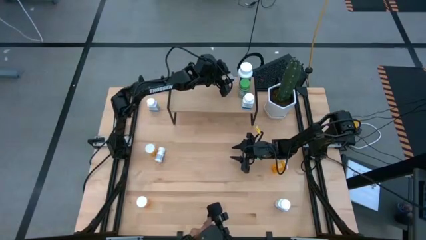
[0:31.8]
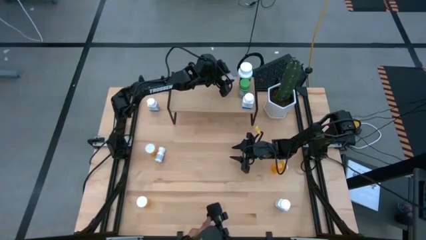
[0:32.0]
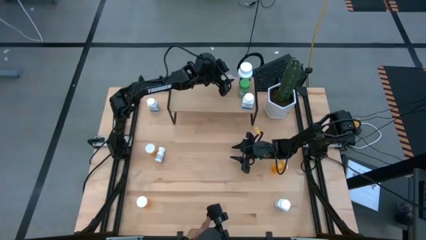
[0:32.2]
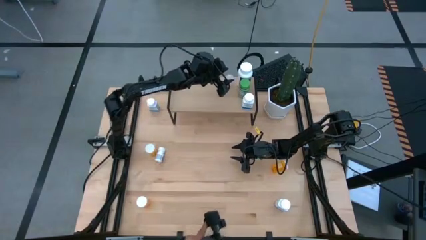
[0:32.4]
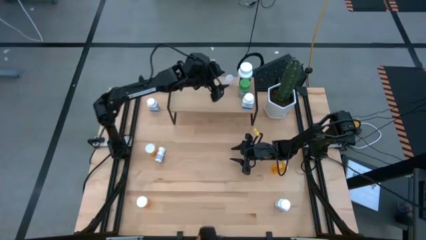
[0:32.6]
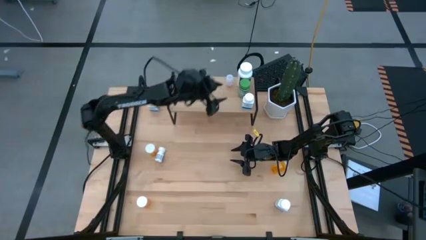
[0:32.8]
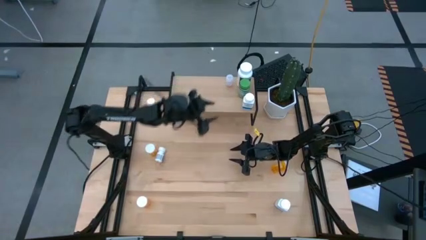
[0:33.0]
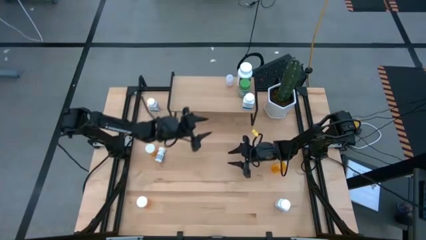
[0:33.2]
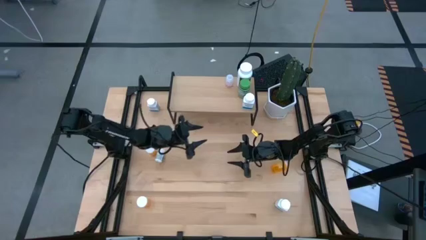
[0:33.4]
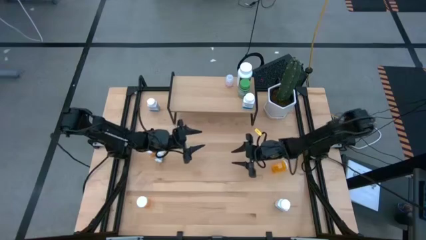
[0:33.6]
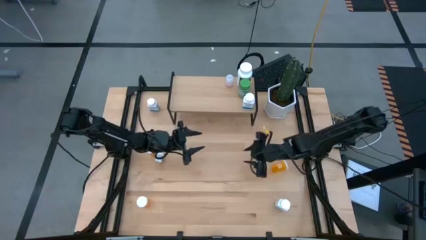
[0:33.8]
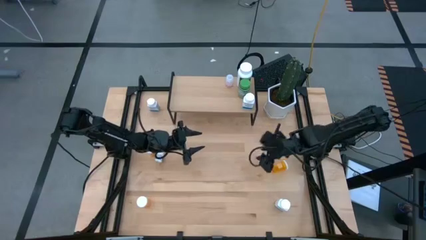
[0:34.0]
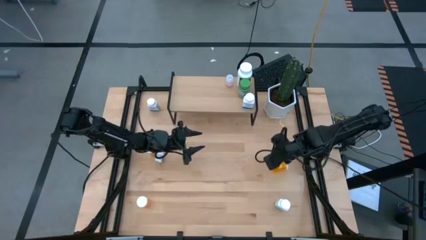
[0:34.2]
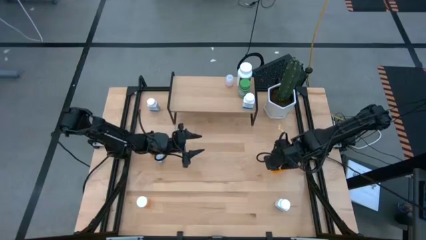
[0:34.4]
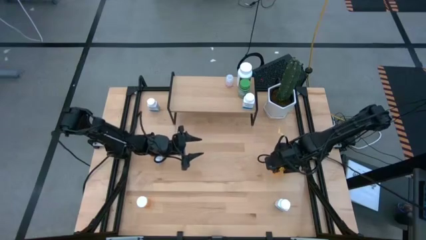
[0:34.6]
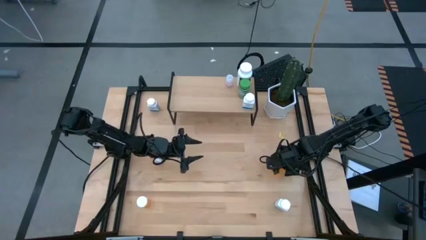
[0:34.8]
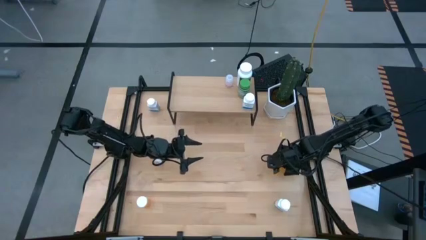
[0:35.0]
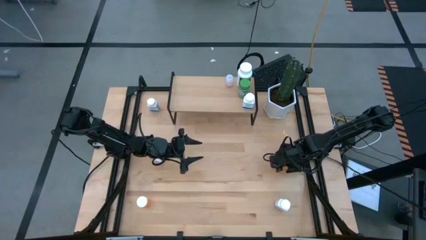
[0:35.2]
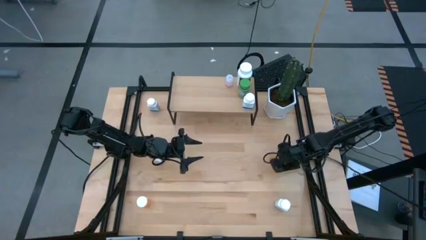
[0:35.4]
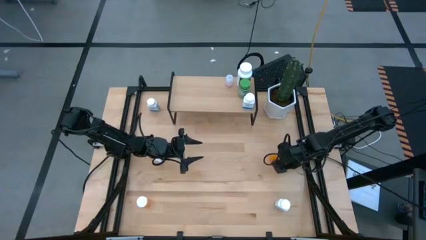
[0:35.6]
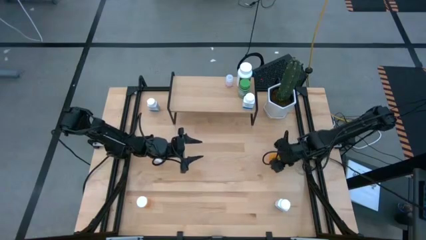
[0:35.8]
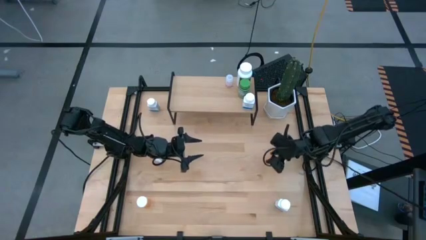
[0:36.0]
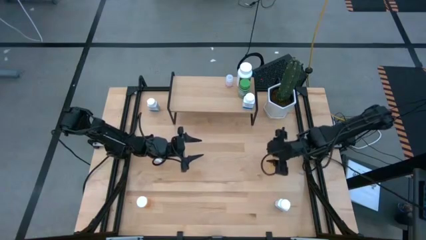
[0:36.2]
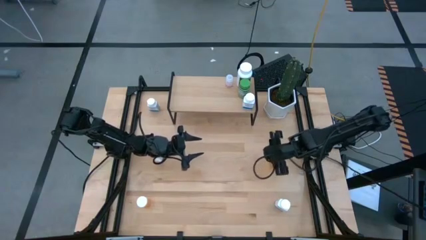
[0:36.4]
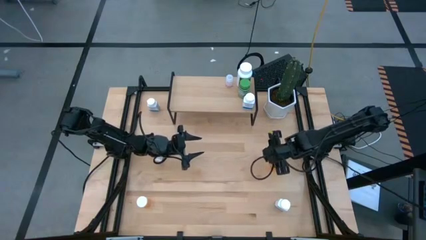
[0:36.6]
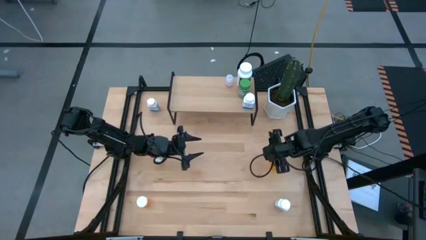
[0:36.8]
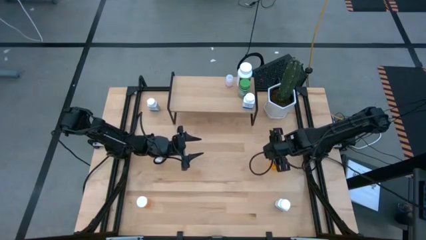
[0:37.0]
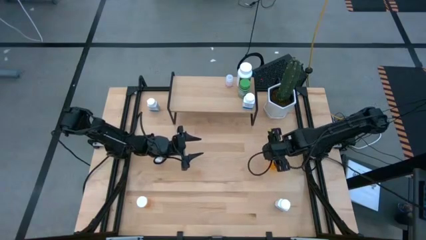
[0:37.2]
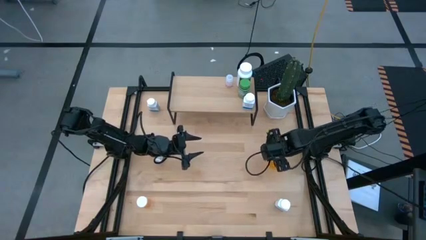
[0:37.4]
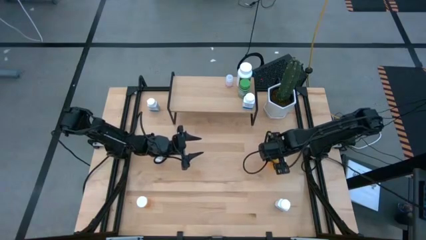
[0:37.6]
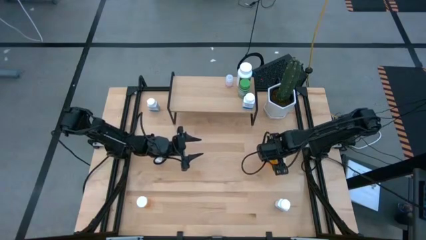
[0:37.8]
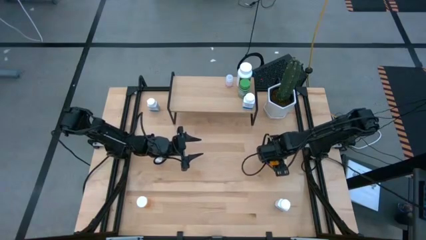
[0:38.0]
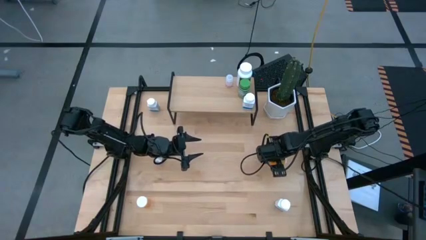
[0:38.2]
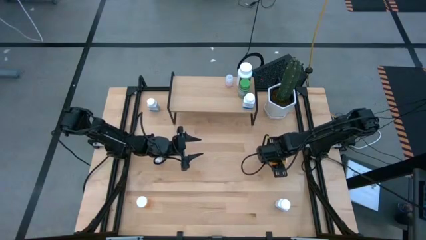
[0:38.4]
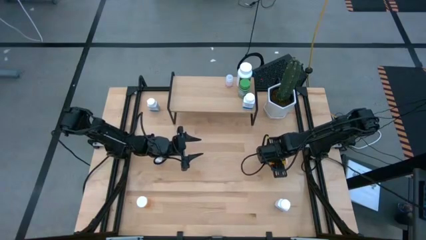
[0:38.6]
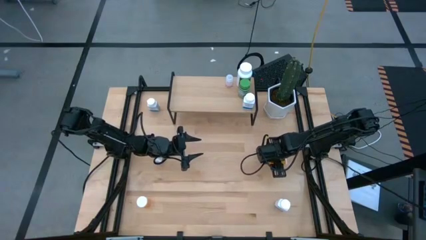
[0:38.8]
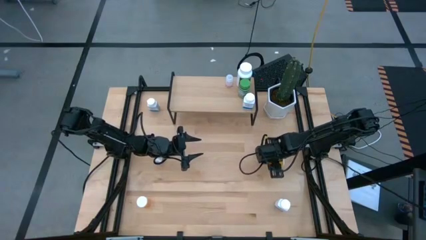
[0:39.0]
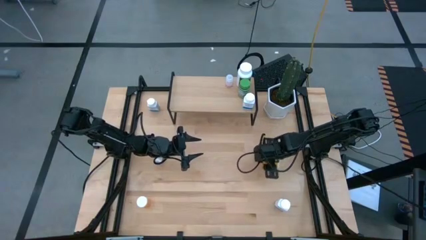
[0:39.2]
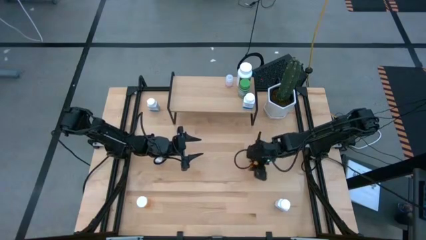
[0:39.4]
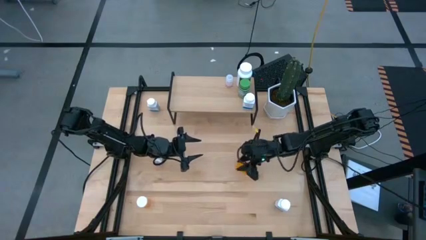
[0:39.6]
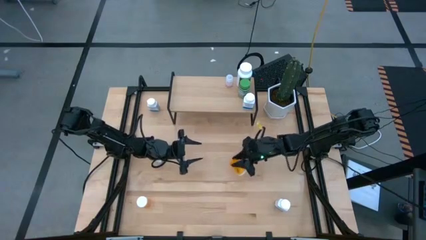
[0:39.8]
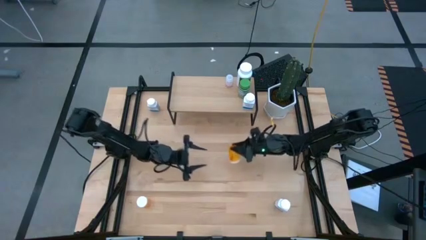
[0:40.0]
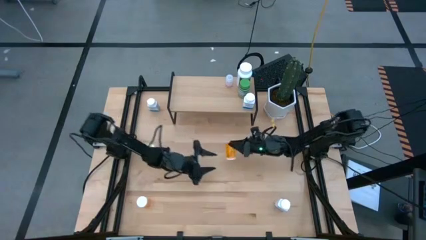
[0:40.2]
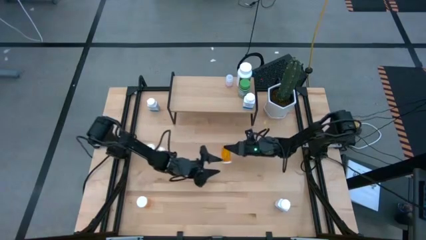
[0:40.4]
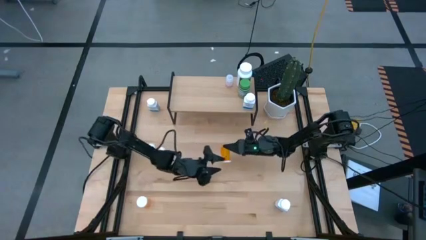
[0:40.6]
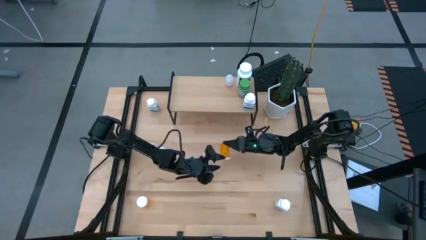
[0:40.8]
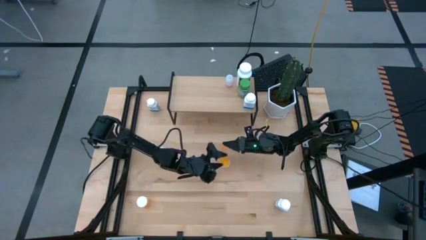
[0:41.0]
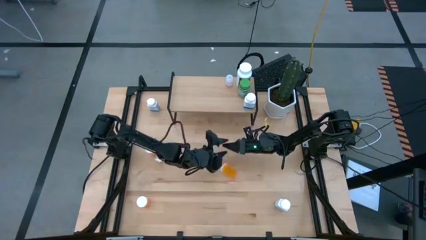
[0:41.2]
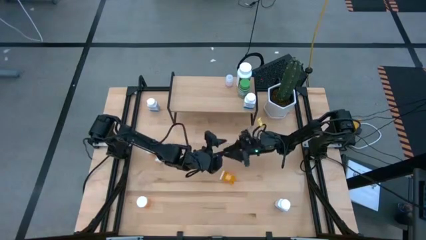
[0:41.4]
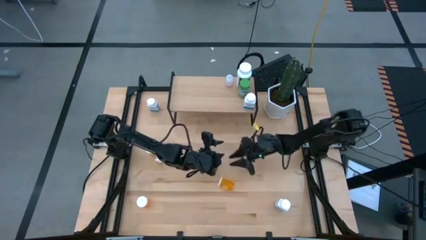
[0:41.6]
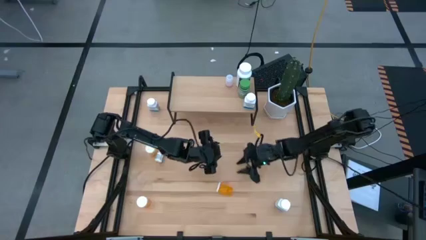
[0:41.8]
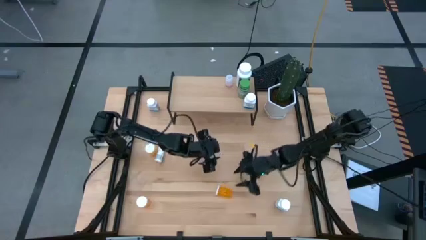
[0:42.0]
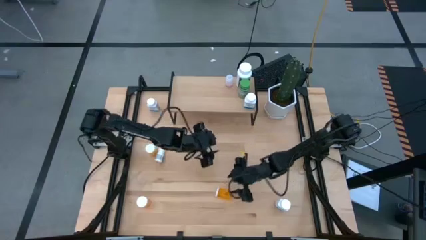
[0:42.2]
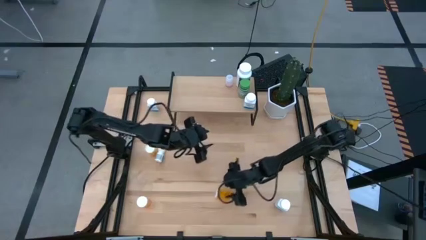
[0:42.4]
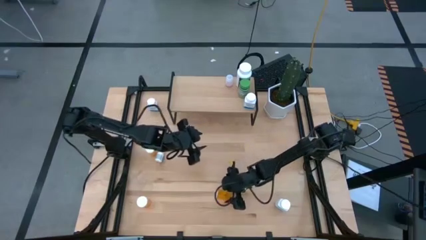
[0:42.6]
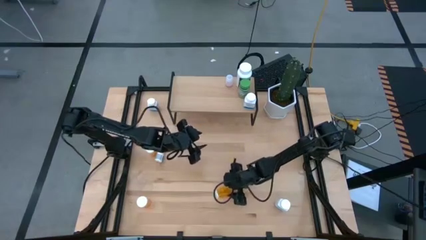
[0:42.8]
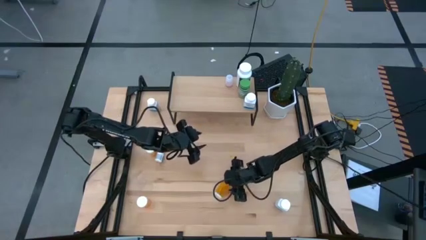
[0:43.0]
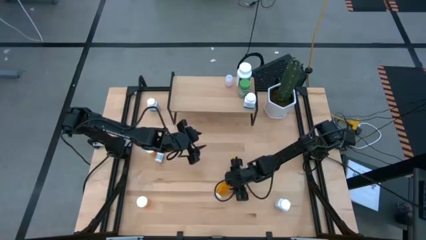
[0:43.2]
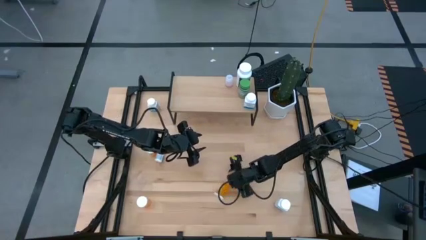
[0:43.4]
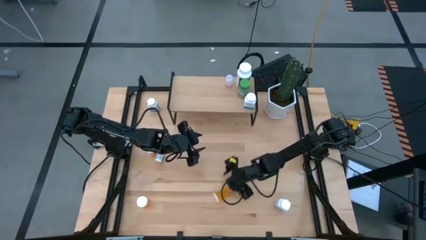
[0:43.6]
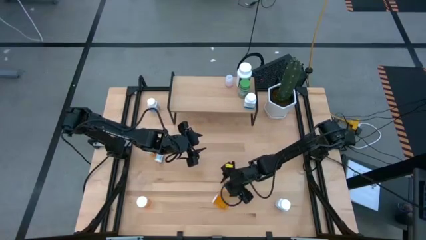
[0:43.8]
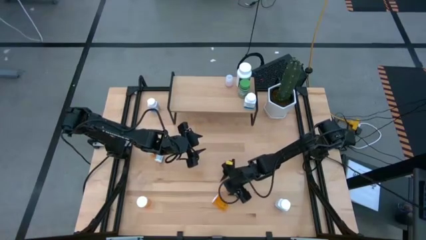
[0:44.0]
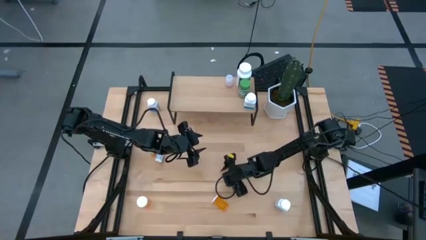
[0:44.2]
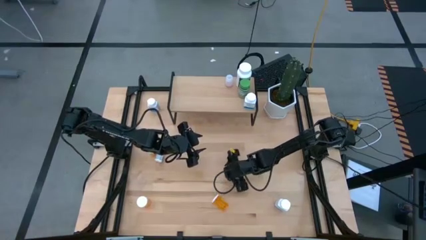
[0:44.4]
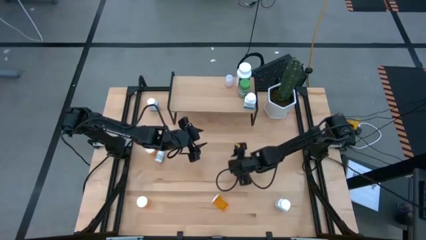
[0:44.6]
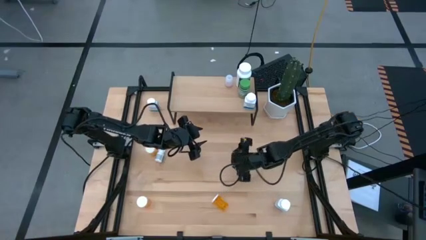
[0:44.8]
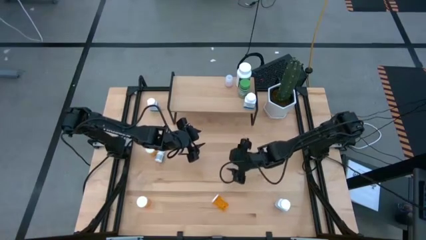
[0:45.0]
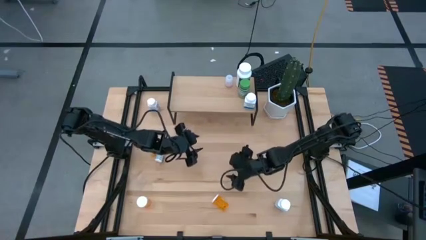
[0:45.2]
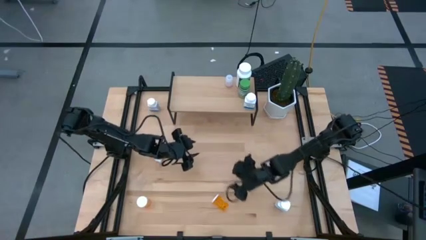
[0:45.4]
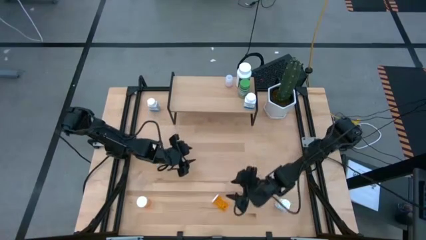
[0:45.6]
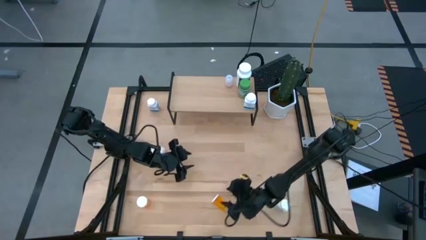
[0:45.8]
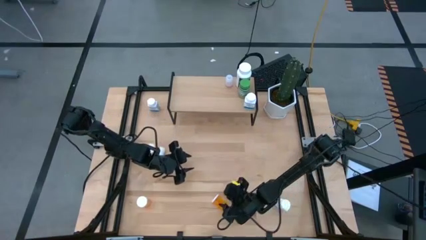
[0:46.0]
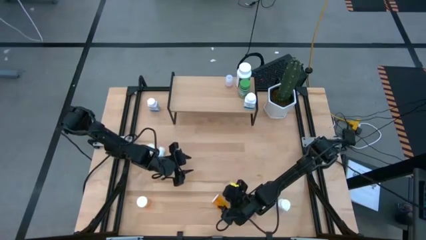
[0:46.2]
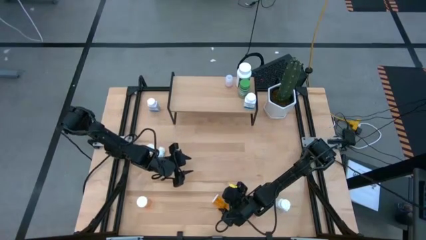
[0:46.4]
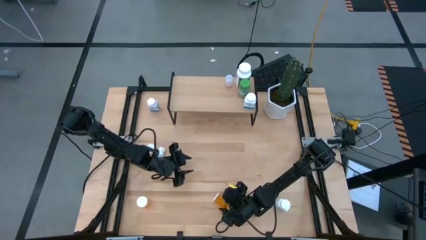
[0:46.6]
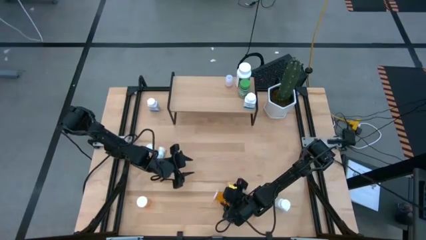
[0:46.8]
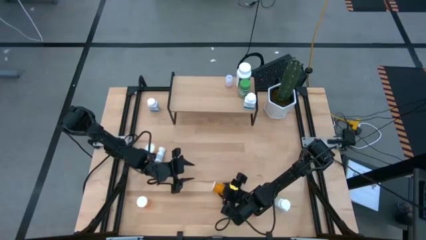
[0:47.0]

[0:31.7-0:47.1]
Task: Pick and place medicine bottles onto shelf by color
Put the top right orange pill bottle on the shelf

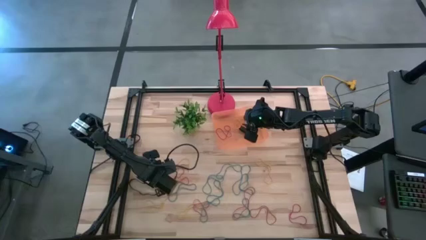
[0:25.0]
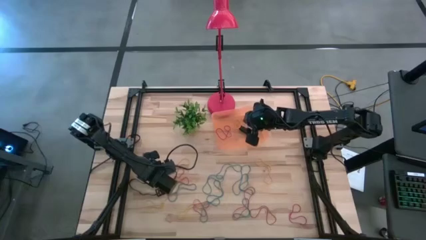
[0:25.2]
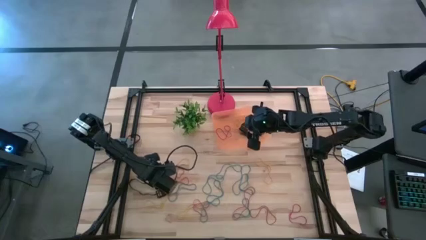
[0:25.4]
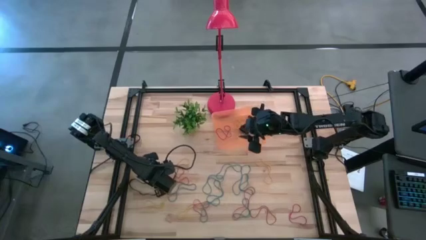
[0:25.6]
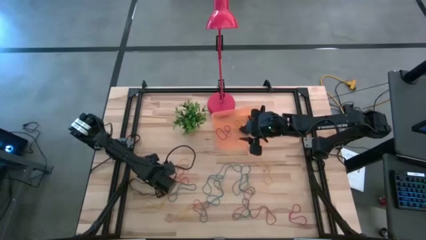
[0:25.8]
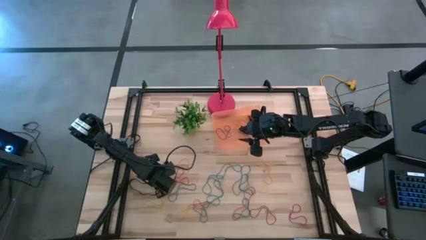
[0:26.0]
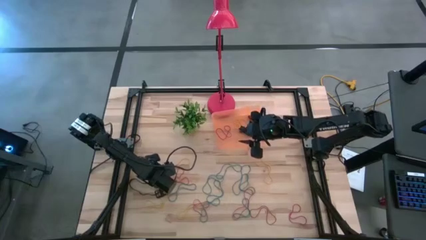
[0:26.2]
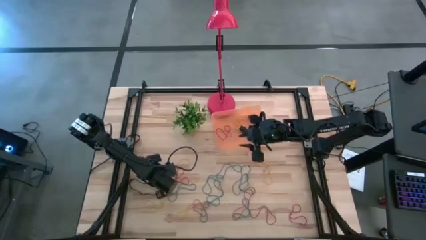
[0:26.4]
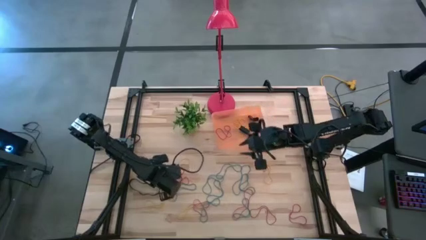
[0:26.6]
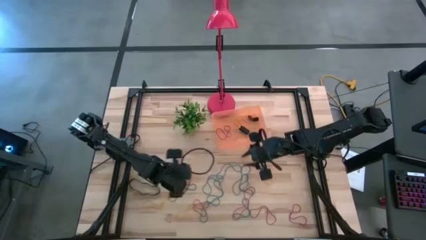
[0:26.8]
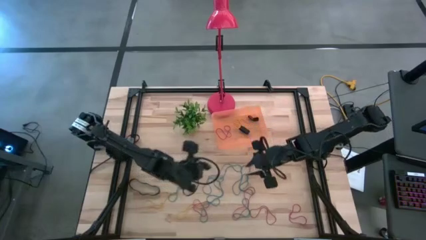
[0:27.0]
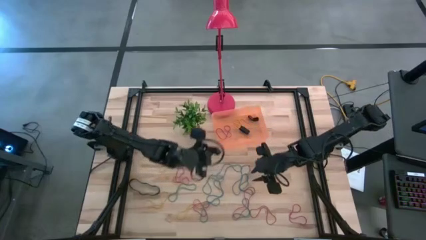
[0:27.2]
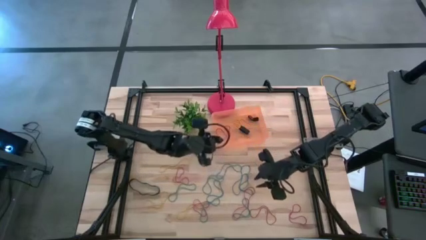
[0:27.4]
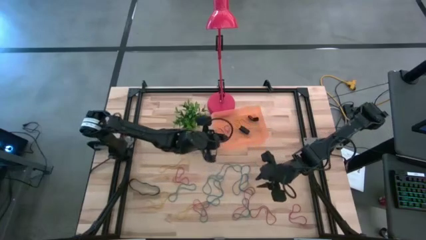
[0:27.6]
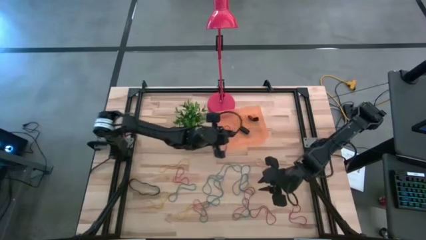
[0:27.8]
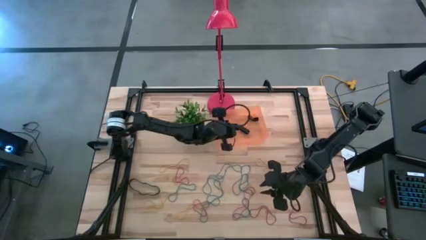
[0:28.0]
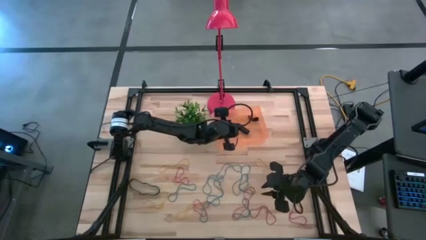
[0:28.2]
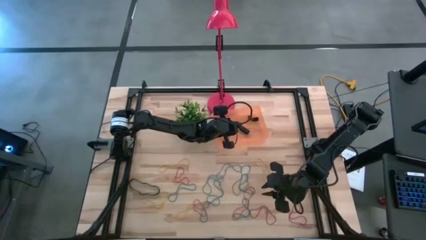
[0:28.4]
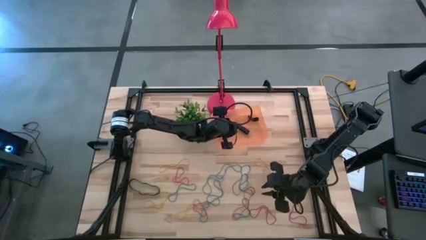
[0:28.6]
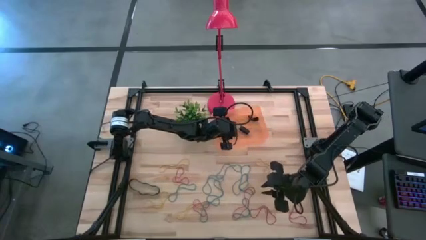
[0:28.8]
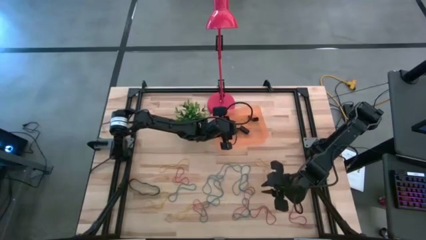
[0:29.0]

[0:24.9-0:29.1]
Task: Pick and place rubber bands into bin
Put the black rubberband into the orange container
